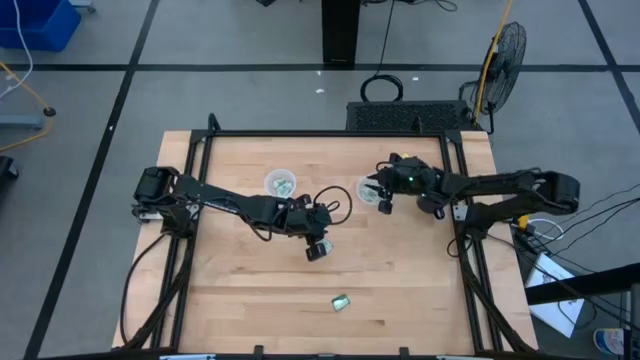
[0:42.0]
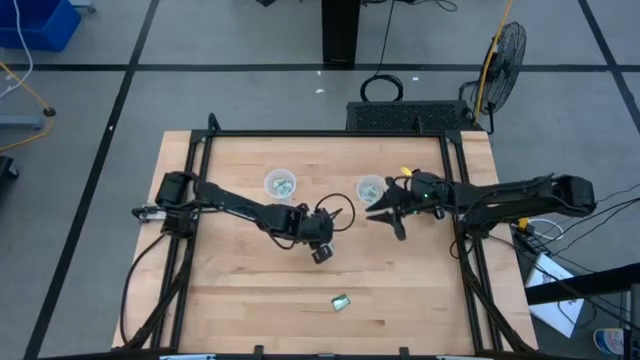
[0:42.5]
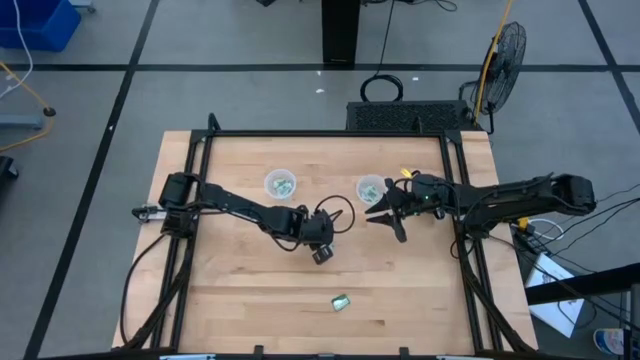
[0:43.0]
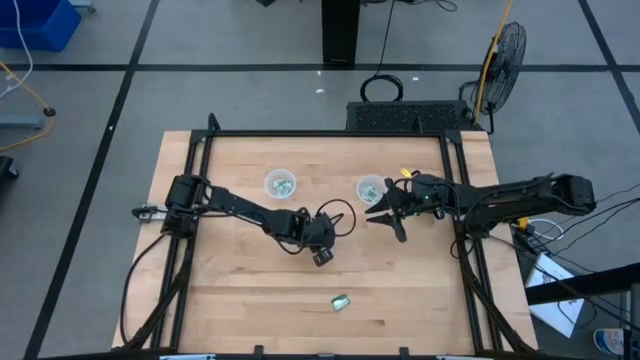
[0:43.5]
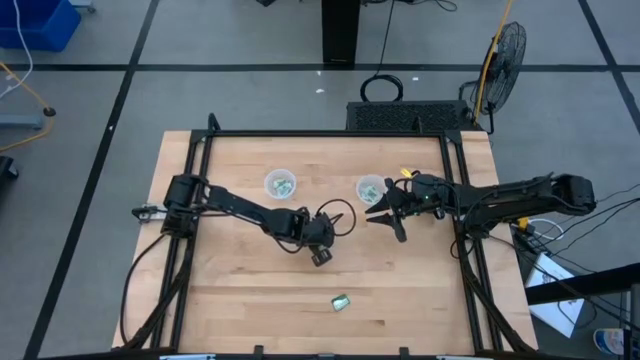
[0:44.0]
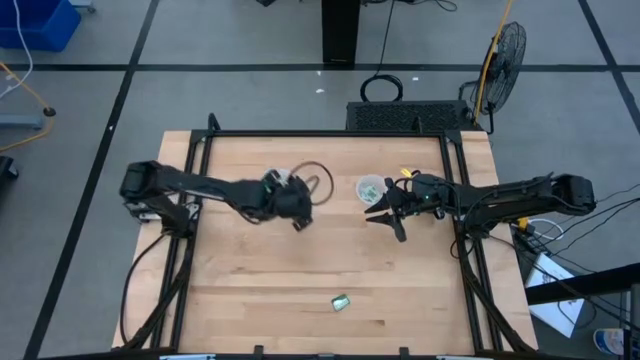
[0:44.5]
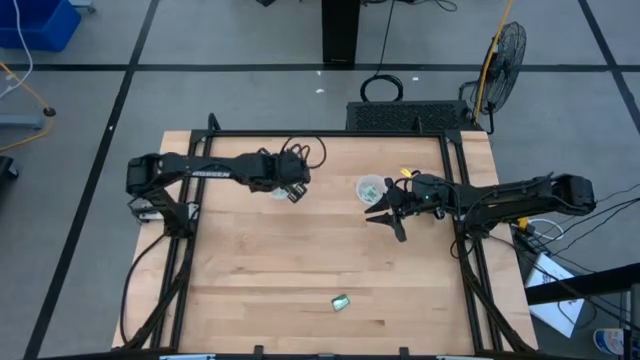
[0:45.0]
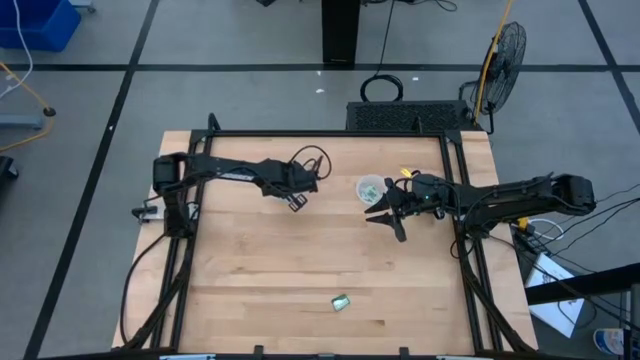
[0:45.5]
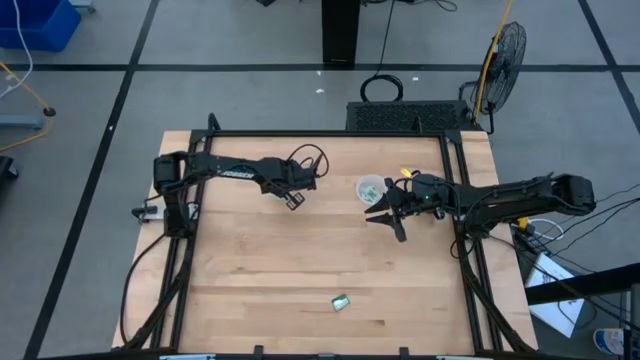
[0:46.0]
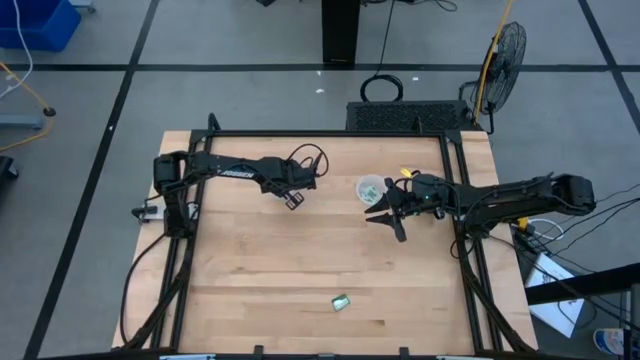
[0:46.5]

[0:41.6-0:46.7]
Task: Pick and place items into bin
Put the stevia packet into the left transparent bin

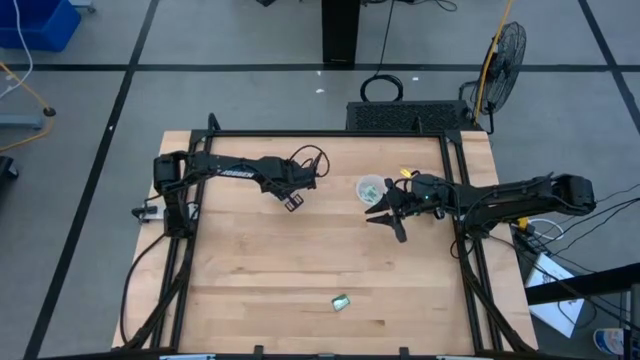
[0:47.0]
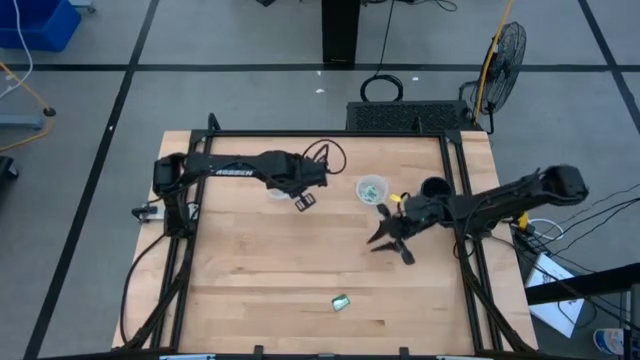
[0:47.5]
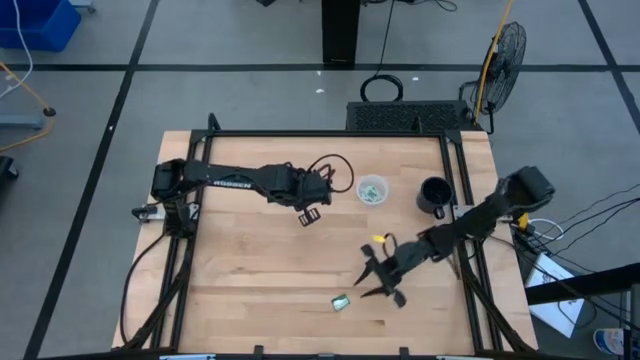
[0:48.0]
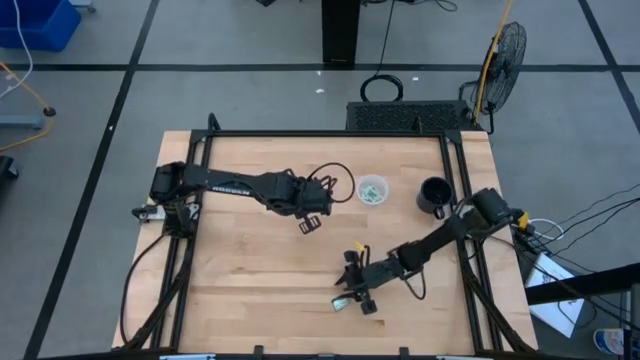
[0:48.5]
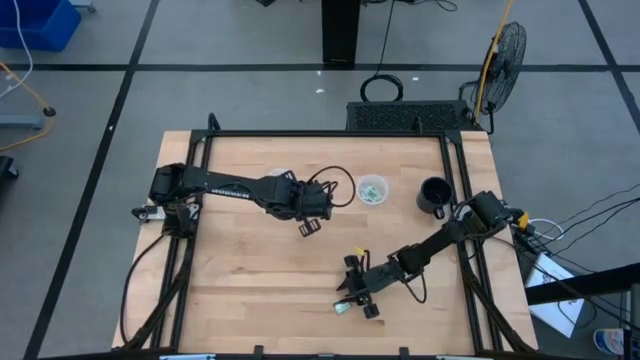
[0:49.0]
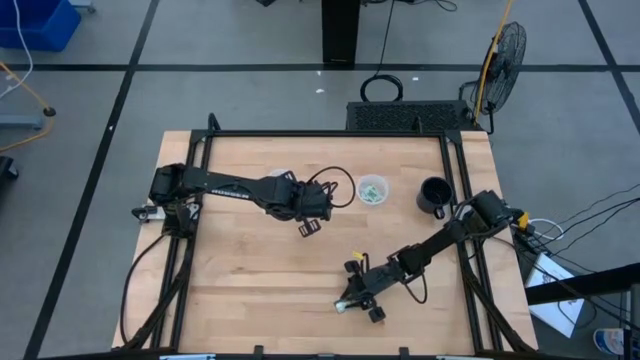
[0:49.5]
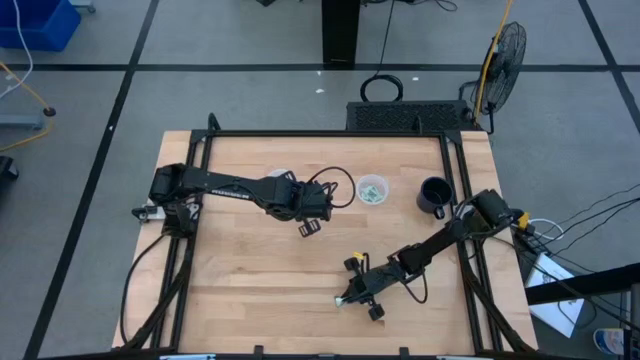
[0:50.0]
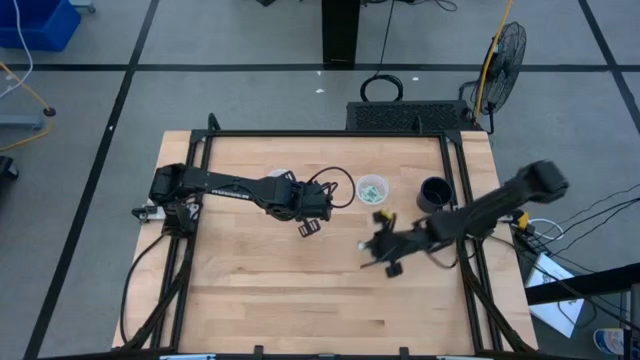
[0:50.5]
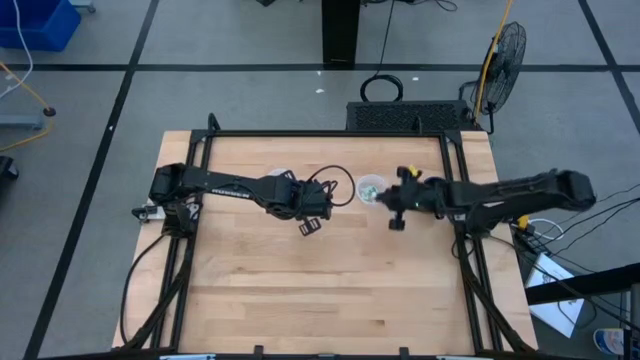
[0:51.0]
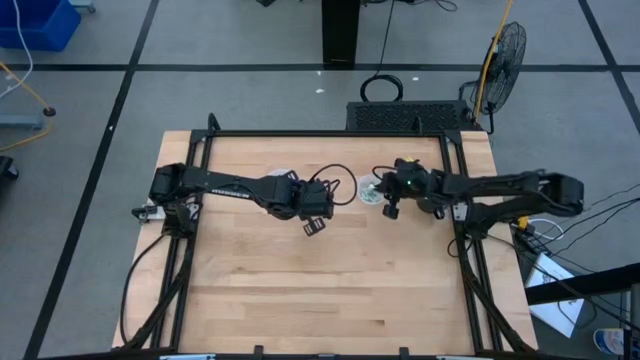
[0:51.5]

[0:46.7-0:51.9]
Put the truvia packet into the right transparent bin

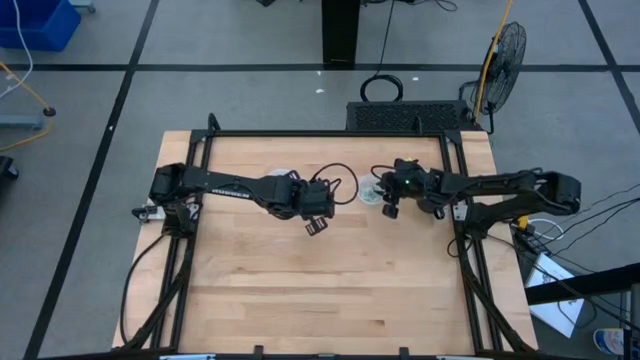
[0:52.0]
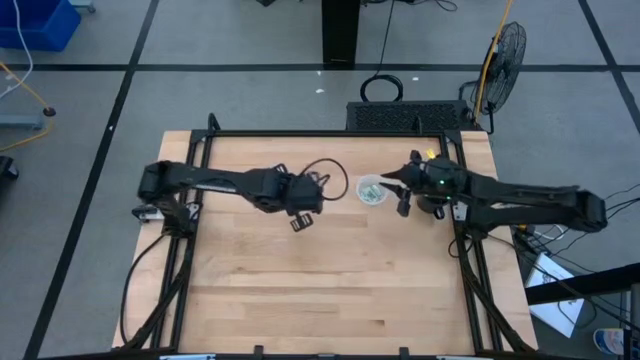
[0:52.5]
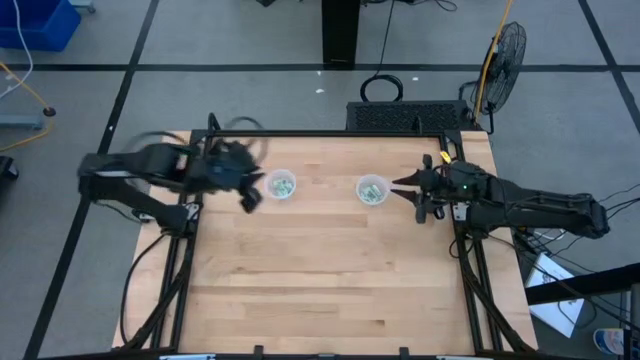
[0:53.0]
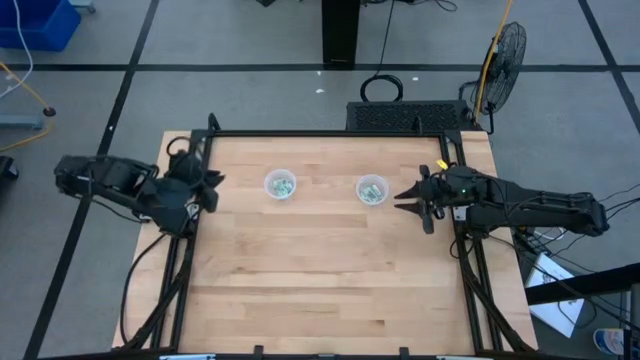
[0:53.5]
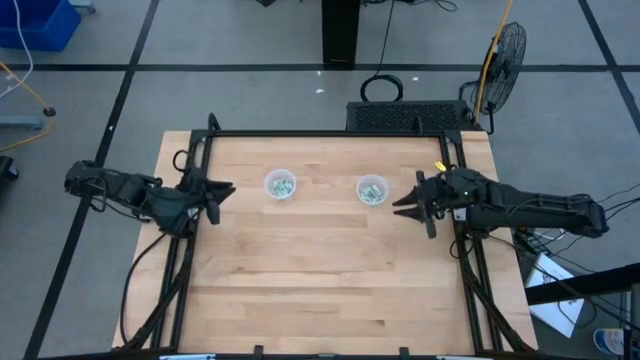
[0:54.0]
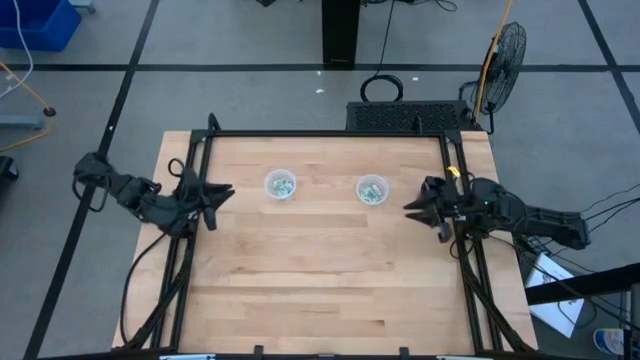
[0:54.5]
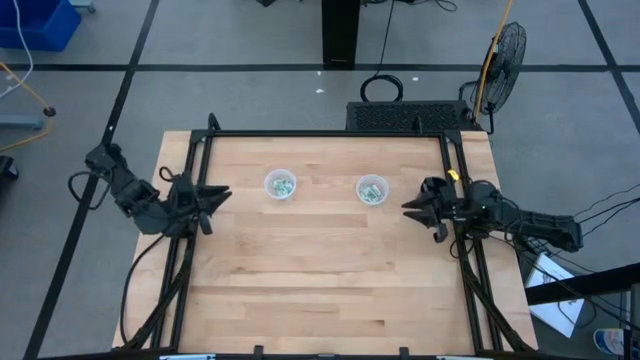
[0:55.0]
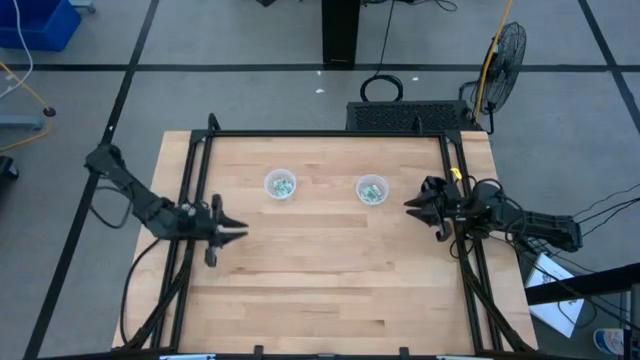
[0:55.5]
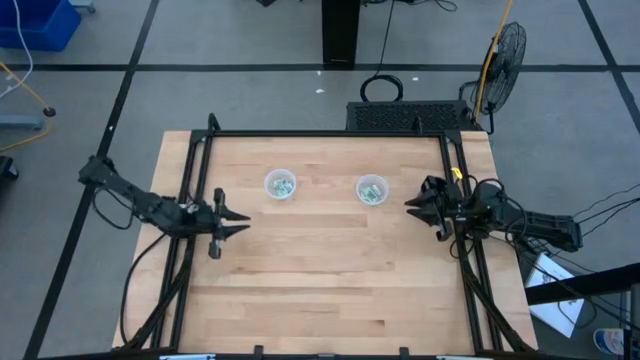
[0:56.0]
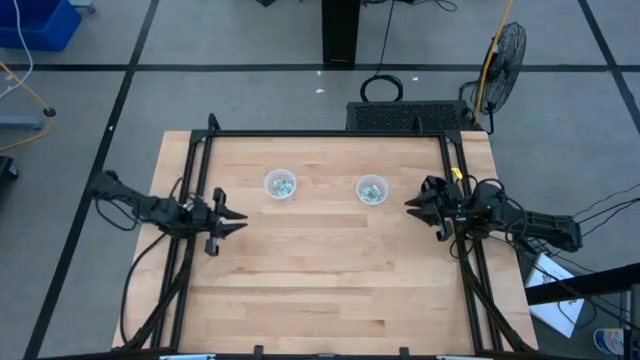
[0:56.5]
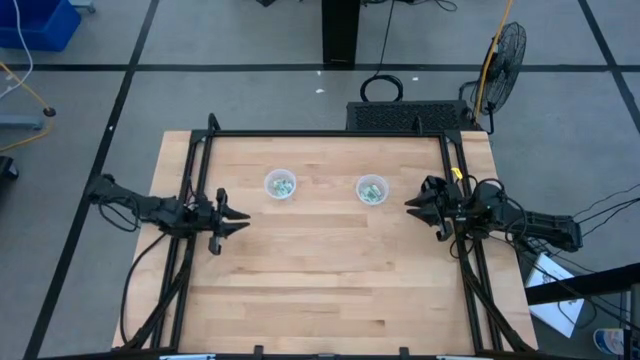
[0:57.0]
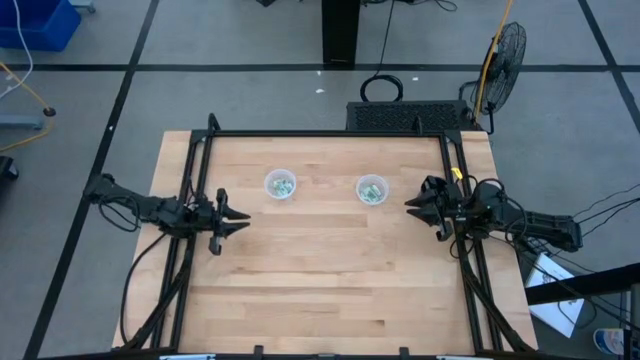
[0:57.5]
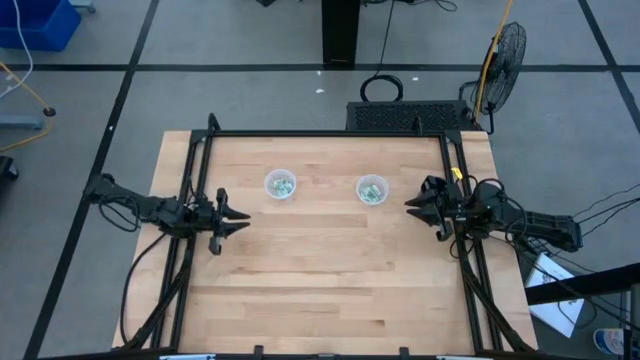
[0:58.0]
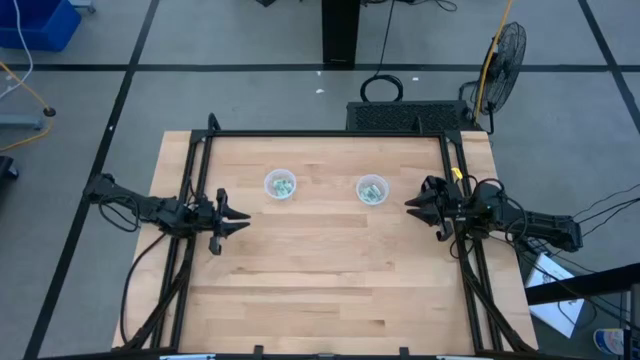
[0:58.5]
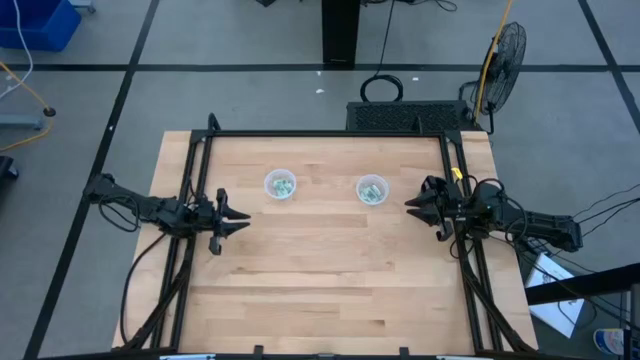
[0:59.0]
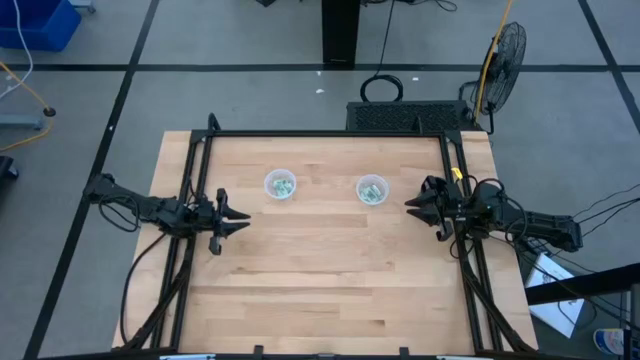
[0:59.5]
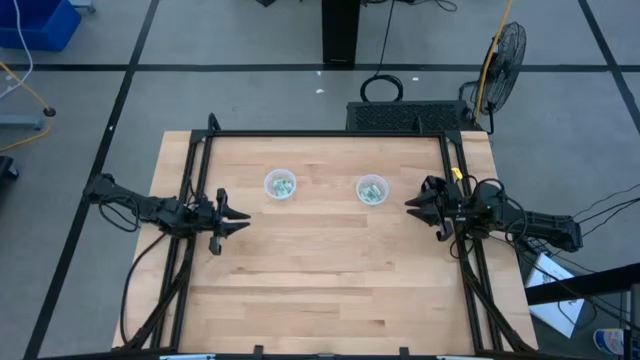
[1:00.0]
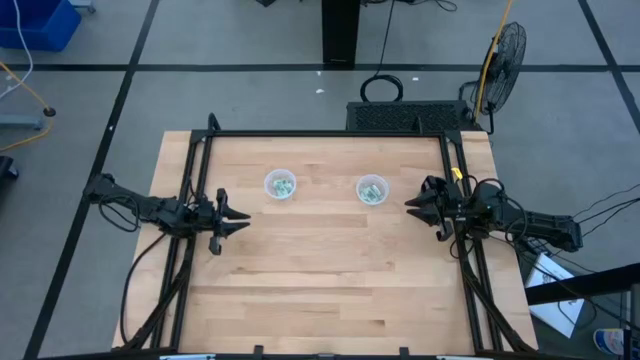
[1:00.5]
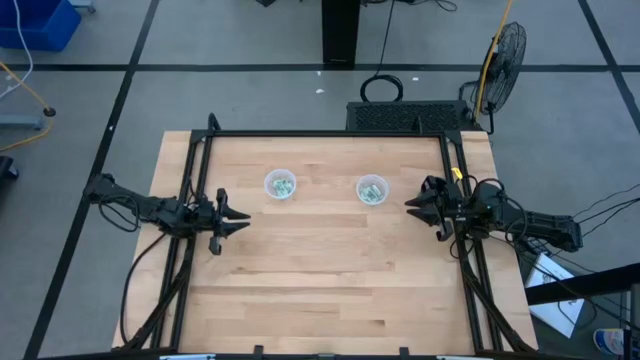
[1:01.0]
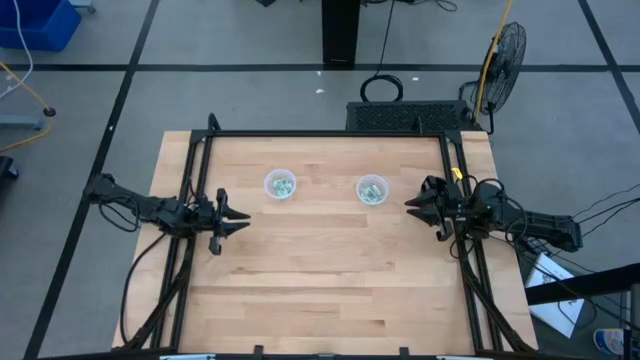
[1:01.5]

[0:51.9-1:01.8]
Return to Home Position

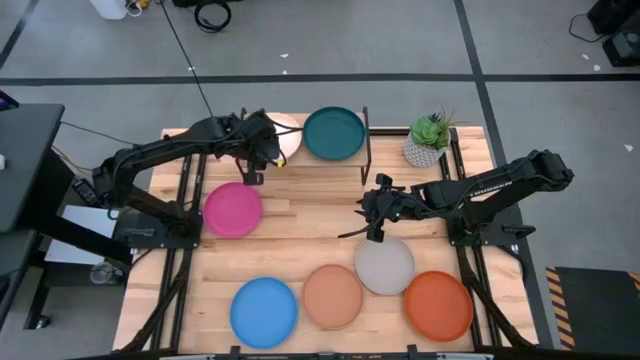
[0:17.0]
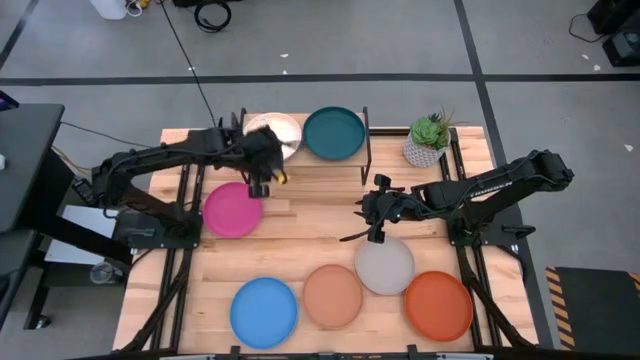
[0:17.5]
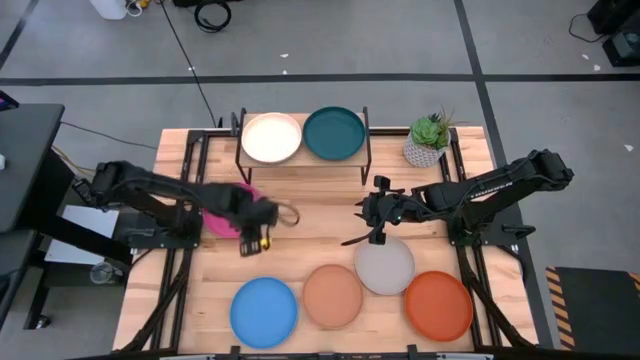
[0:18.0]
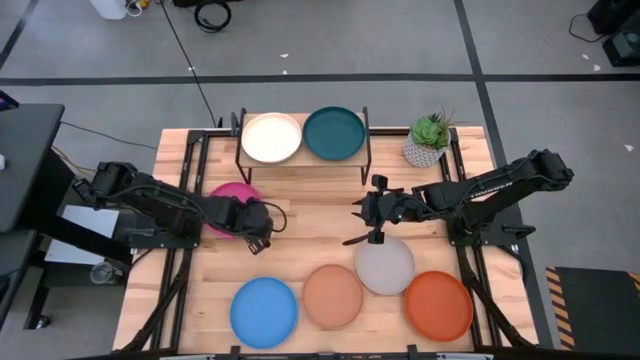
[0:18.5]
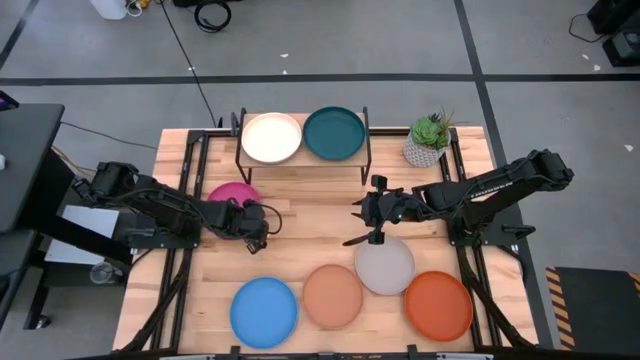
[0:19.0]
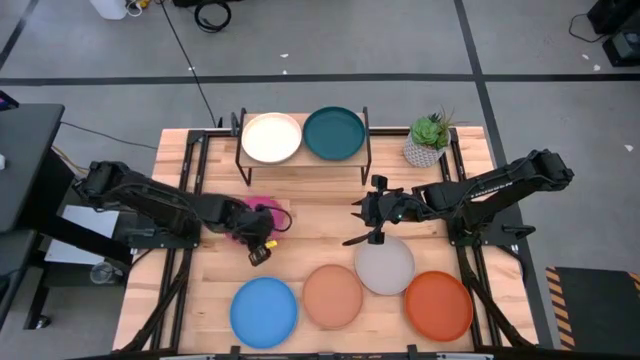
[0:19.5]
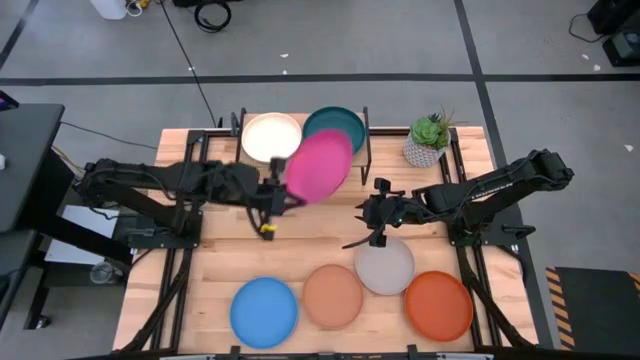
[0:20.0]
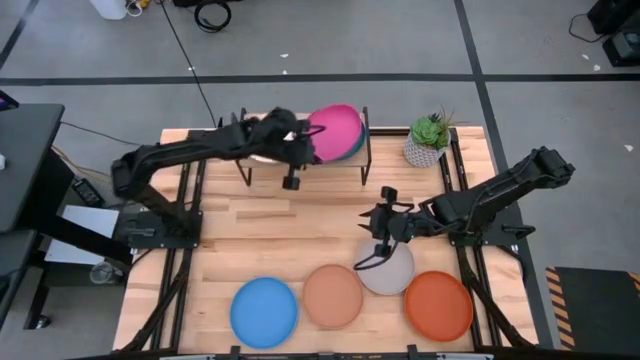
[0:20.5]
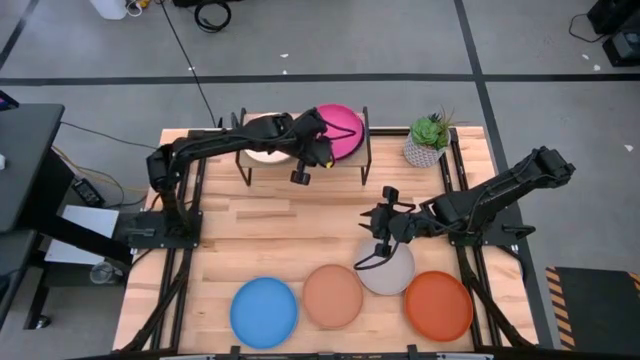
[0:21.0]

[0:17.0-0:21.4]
Task: Place and stack plates onto a shelf
Stack the pink plate on top of the dark green plate on the shelf
